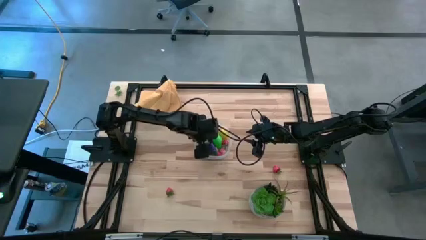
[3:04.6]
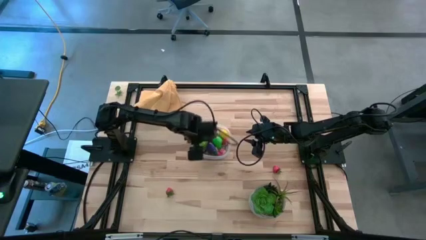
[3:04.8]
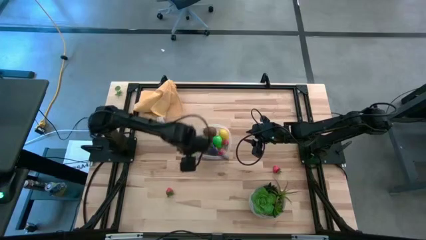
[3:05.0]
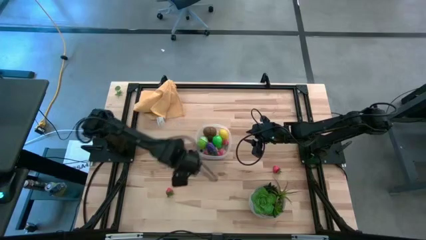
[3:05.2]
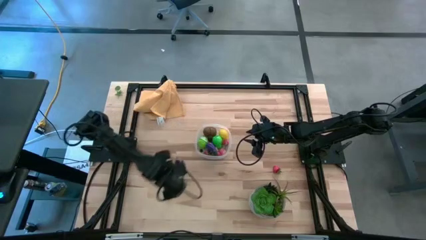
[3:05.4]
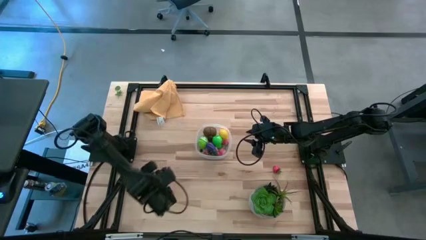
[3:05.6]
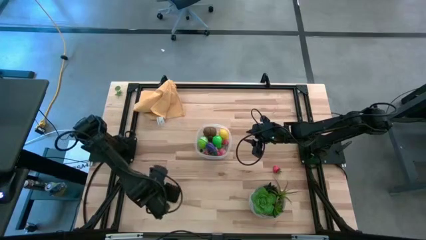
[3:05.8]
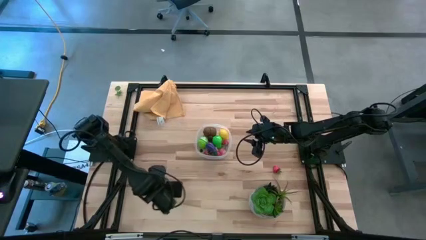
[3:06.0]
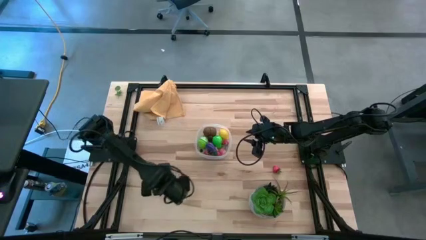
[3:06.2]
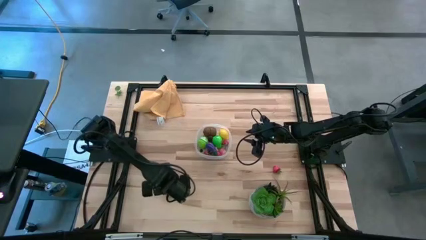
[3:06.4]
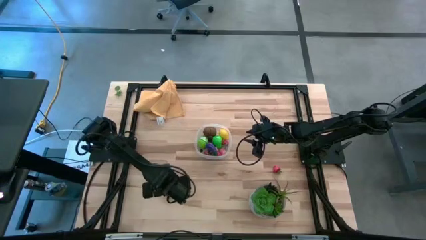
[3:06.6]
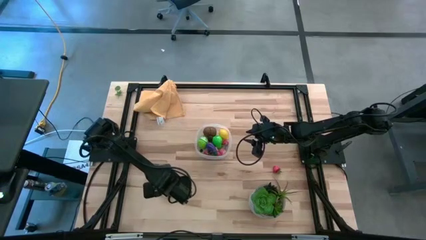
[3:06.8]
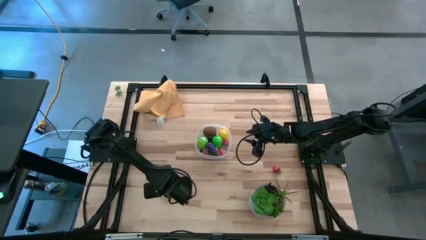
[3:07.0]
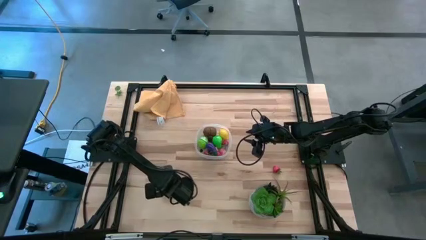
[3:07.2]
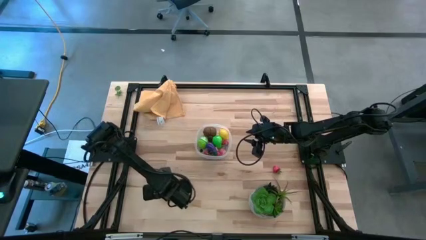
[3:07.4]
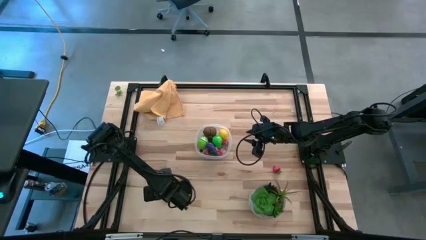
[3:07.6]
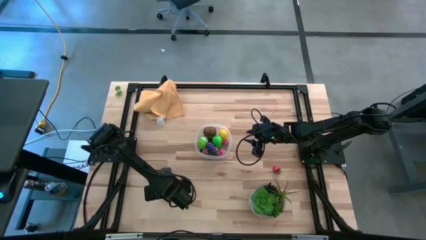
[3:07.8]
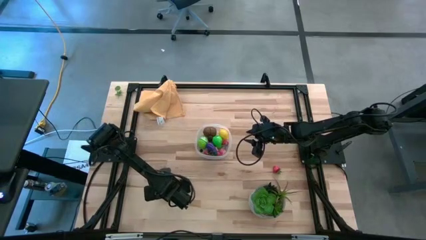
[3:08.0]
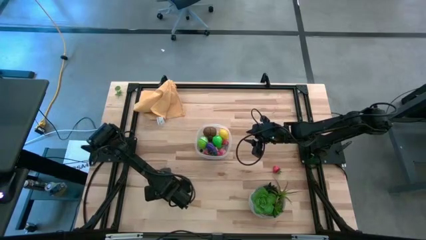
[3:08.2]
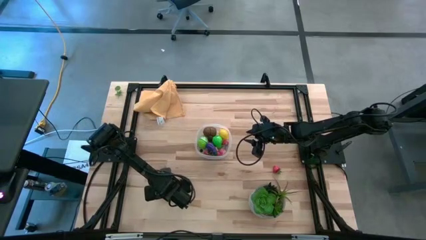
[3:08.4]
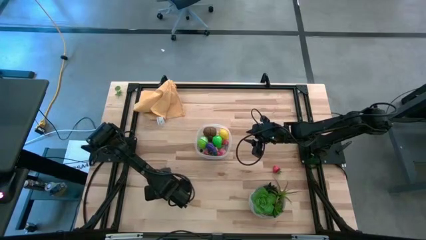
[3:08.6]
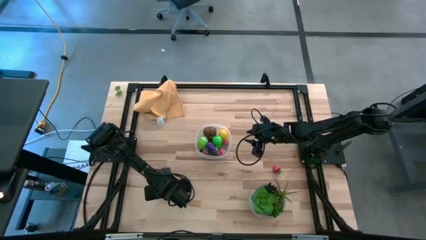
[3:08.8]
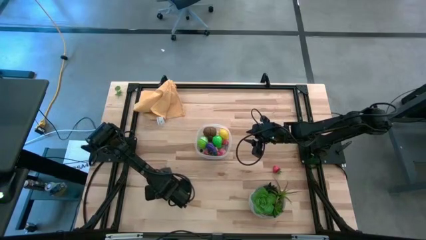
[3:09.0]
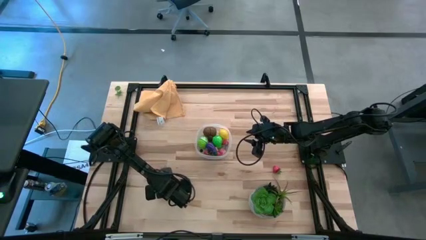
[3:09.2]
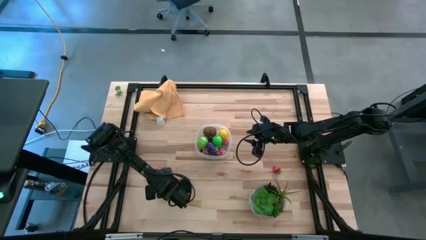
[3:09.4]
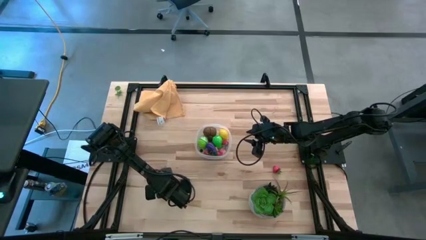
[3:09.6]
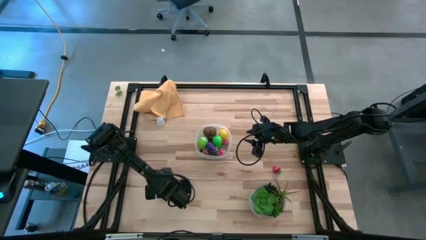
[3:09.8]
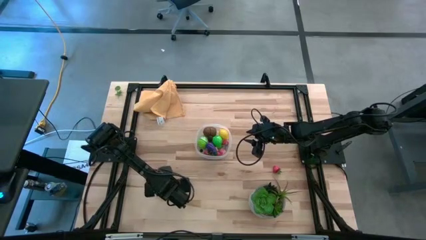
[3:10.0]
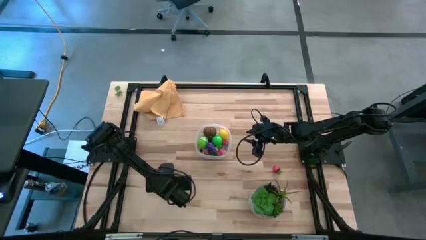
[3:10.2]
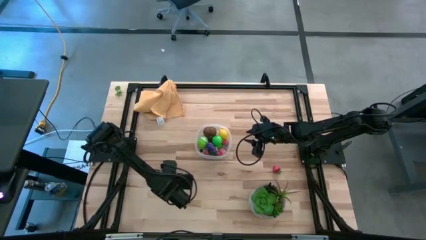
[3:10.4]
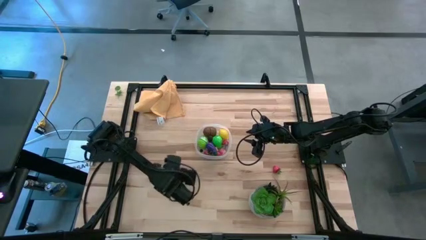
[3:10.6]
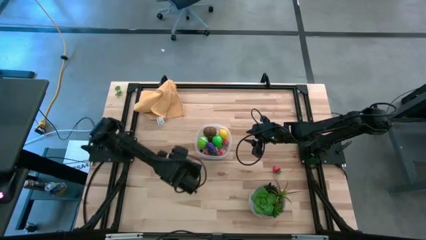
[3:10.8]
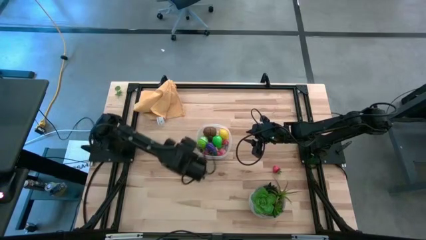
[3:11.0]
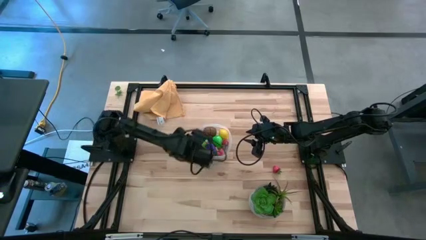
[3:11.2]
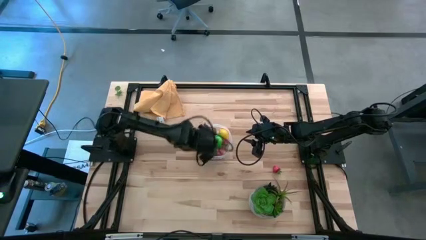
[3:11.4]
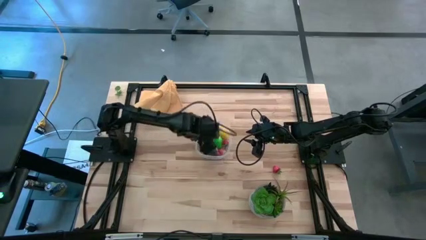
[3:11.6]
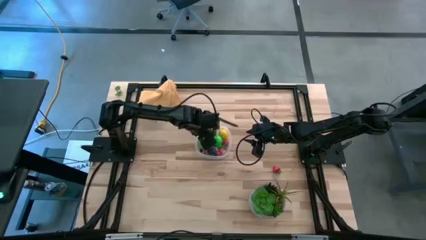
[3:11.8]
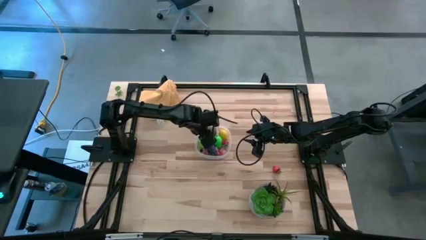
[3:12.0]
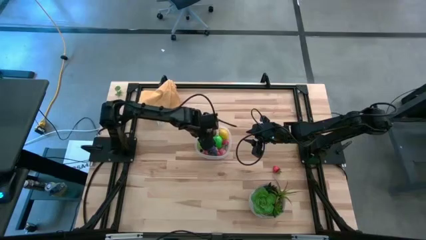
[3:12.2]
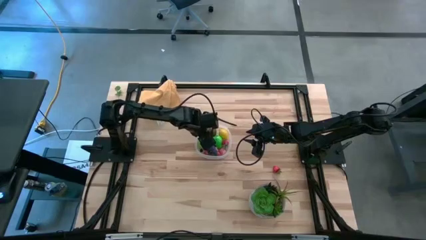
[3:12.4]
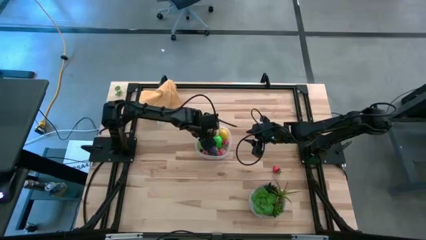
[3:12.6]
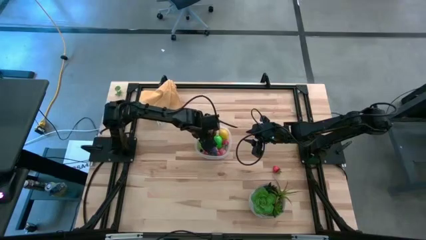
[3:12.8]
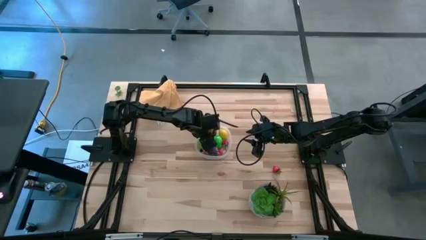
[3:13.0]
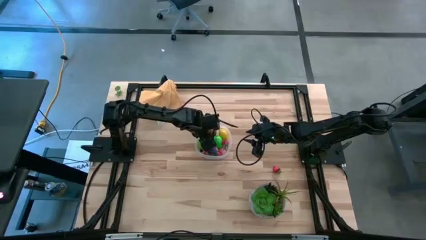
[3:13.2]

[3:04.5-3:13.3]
Task: Pick and placing Produce into tupperware
Put the left strawberry into the transparent bin

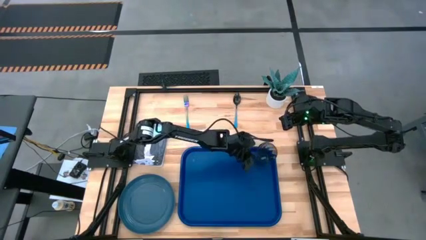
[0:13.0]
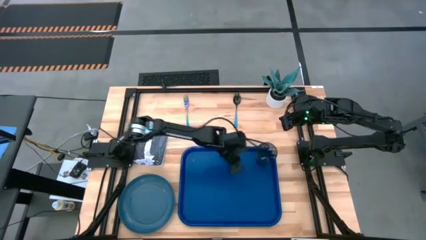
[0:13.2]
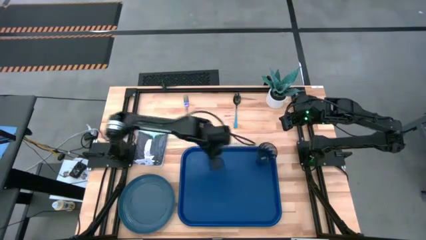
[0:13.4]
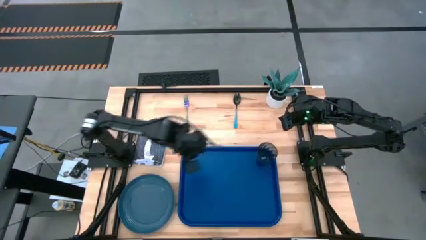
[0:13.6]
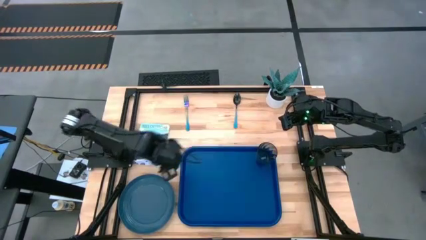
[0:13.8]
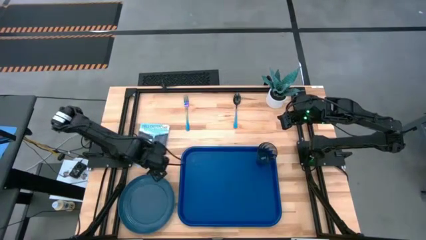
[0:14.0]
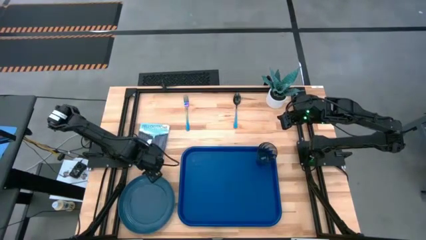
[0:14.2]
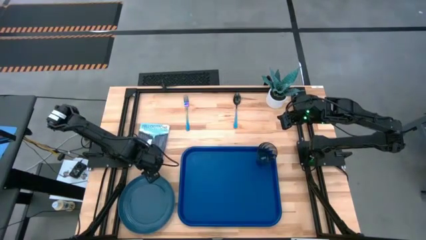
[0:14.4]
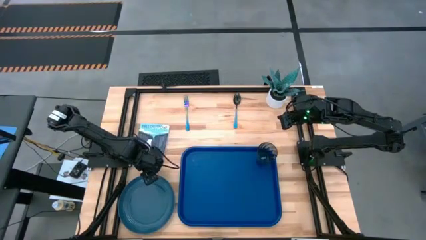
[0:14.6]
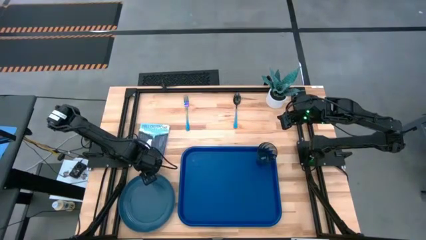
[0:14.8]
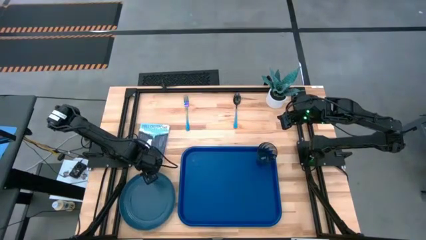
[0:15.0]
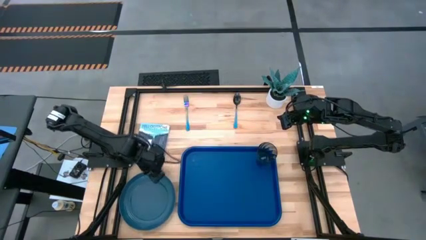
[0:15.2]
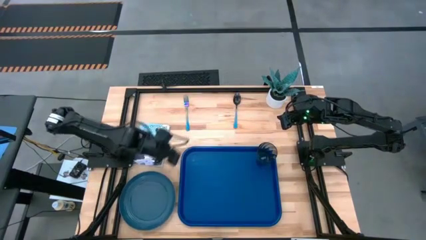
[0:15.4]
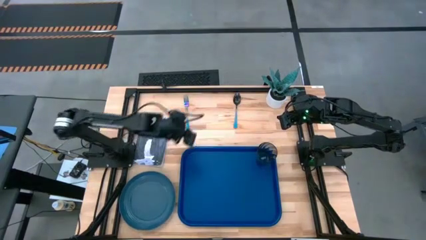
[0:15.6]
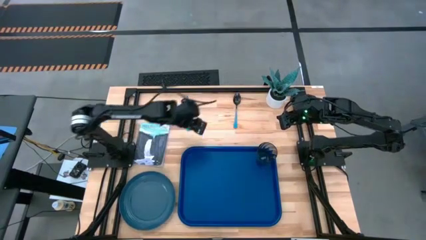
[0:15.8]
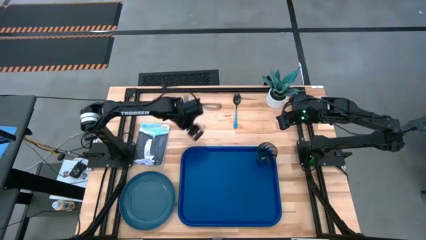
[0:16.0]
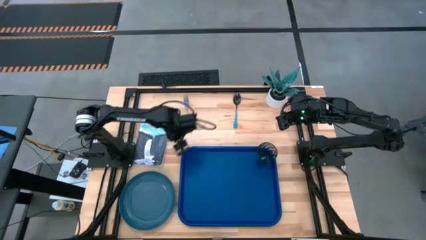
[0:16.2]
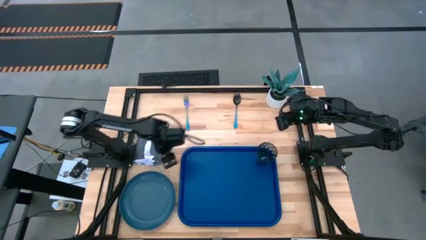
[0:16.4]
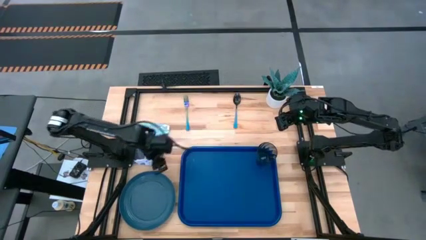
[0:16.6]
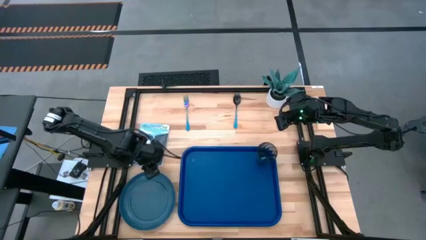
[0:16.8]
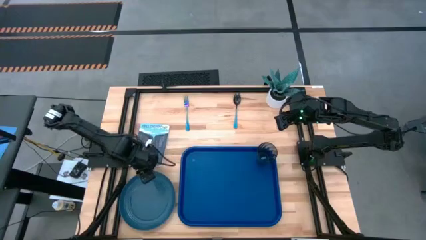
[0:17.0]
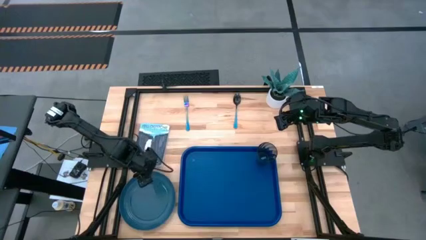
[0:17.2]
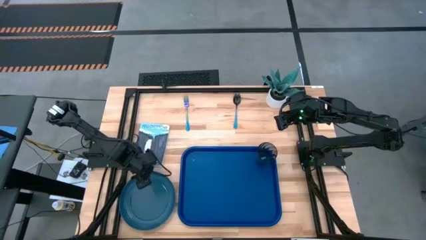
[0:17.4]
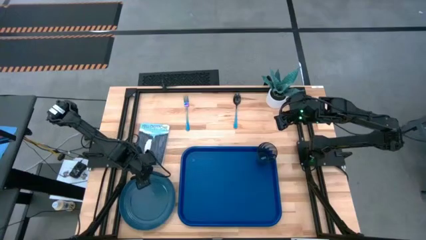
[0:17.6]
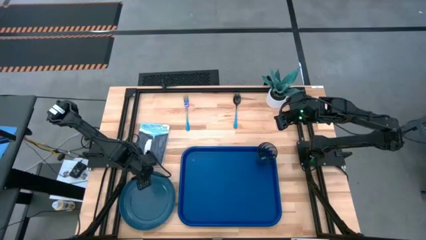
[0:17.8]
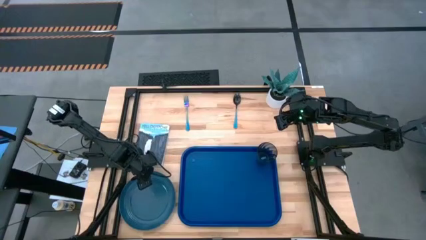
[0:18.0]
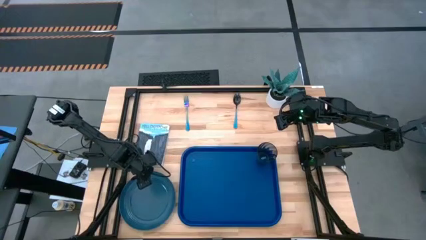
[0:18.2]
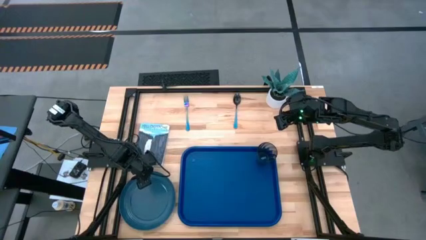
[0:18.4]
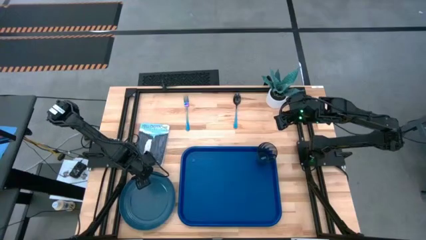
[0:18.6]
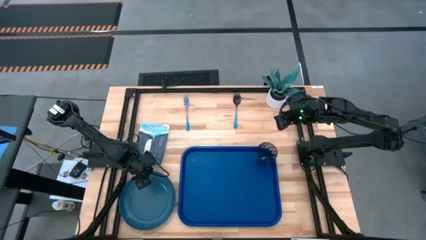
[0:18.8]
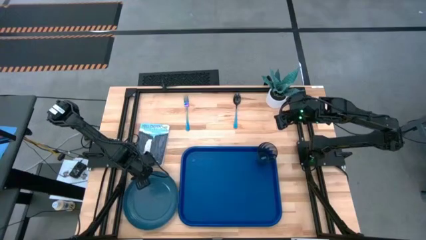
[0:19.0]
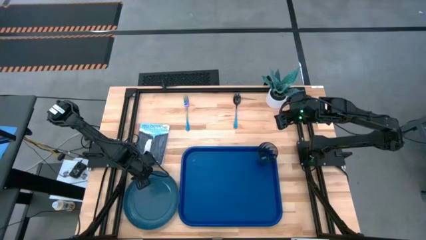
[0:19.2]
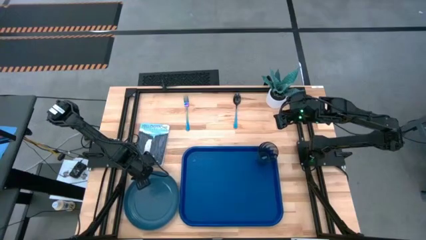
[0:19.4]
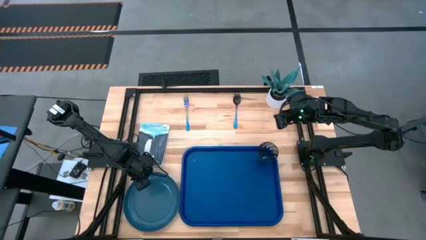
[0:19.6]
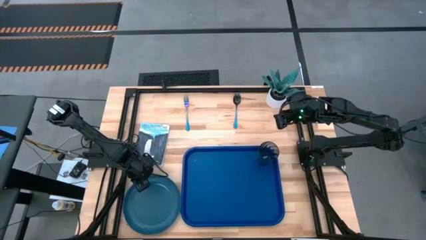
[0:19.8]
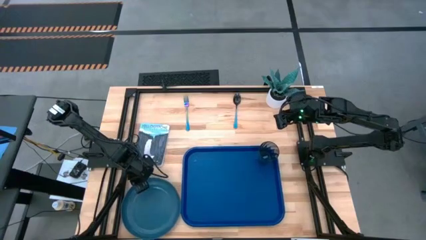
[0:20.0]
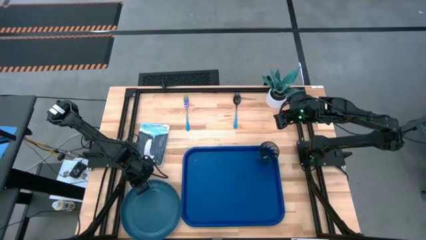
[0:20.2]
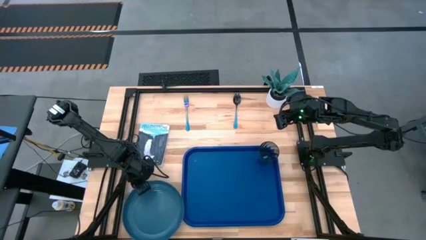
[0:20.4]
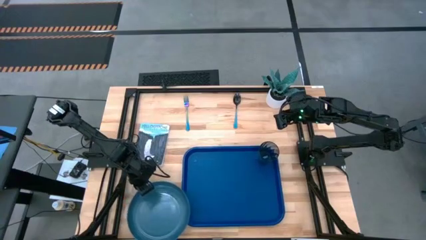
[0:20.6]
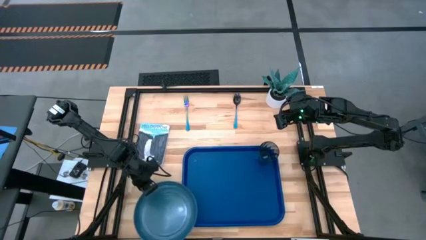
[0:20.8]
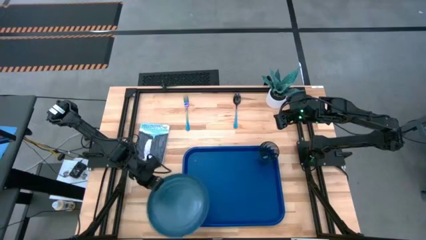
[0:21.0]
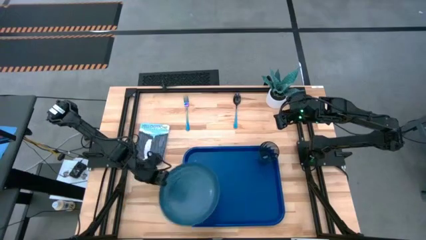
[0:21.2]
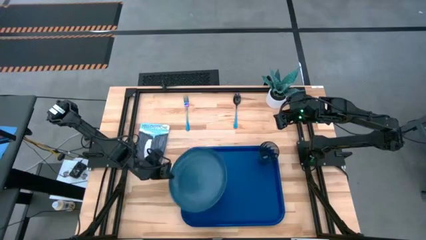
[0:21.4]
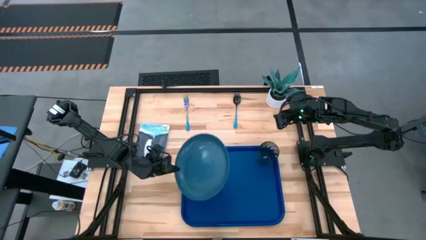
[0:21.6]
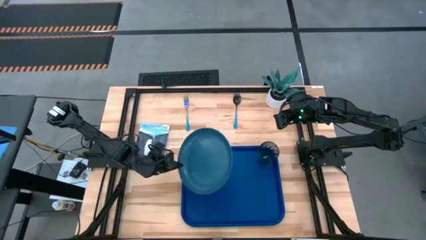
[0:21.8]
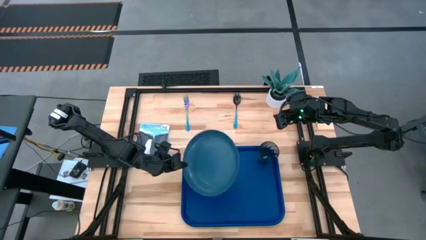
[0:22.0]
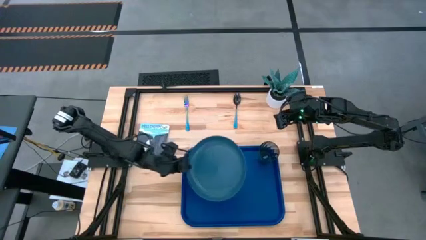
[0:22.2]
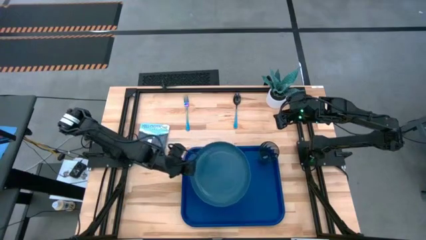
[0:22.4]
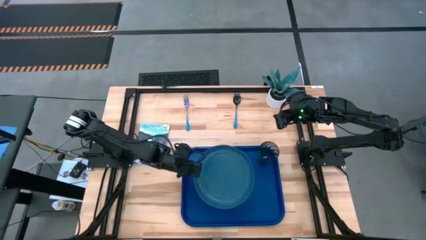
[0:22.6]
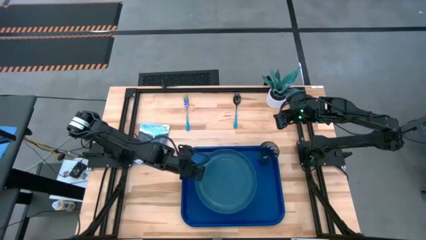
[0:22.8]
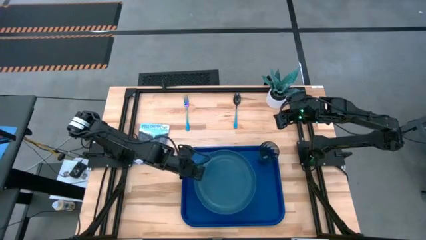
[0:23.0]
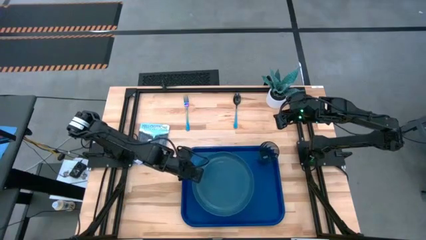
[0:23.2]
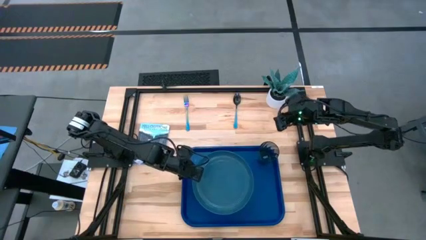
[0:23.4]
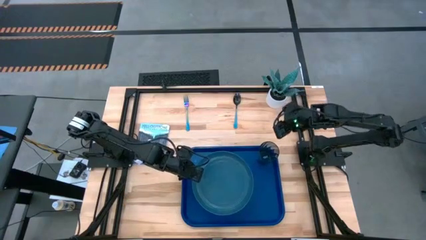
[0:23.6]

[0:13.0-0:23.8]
Task: Pick and place plate/cup/fork/spoon on tray
Put the blue plate on the bottom right of the blue tray
